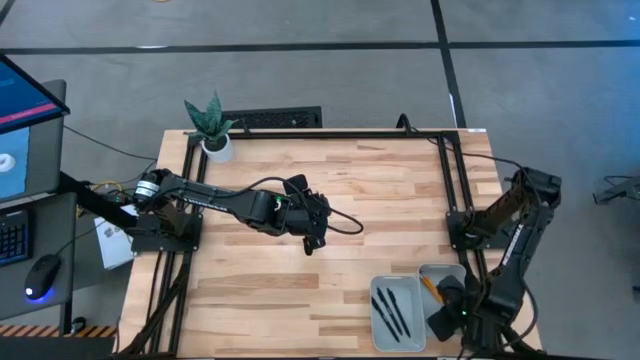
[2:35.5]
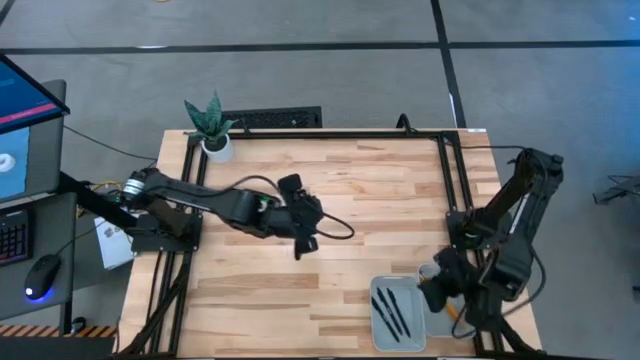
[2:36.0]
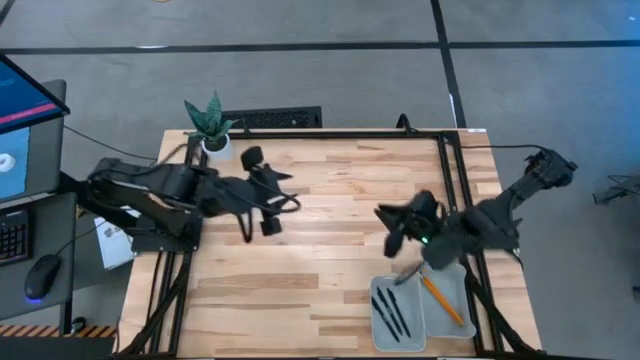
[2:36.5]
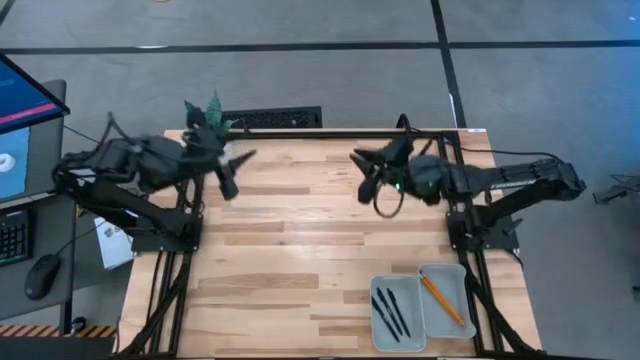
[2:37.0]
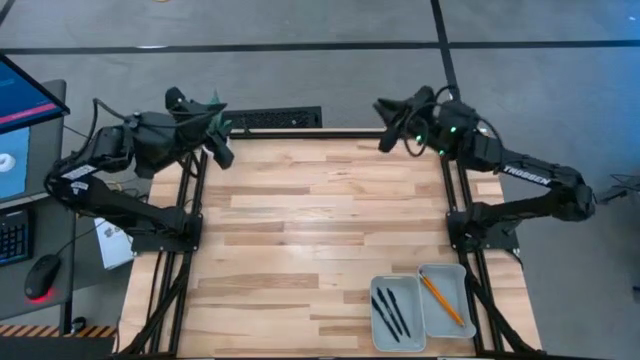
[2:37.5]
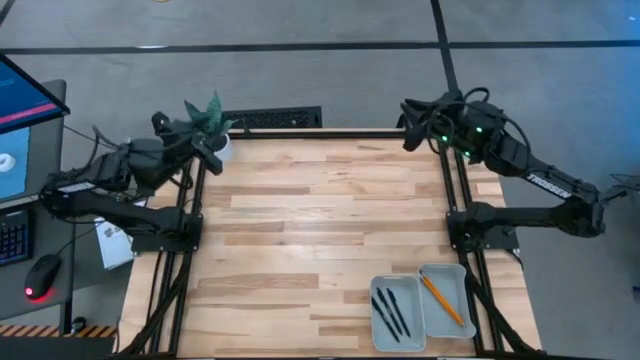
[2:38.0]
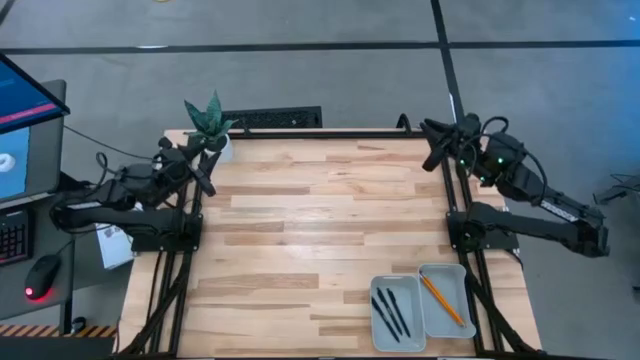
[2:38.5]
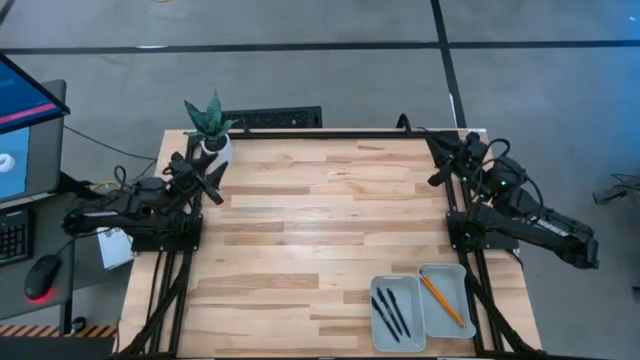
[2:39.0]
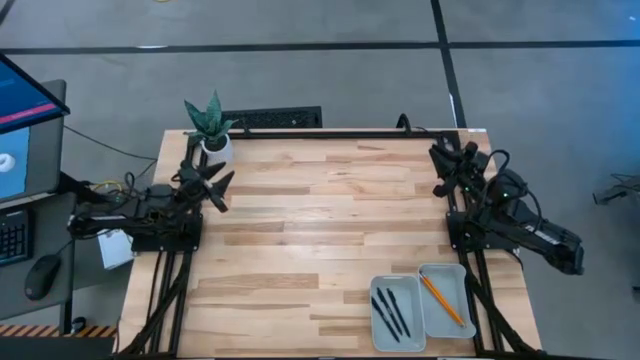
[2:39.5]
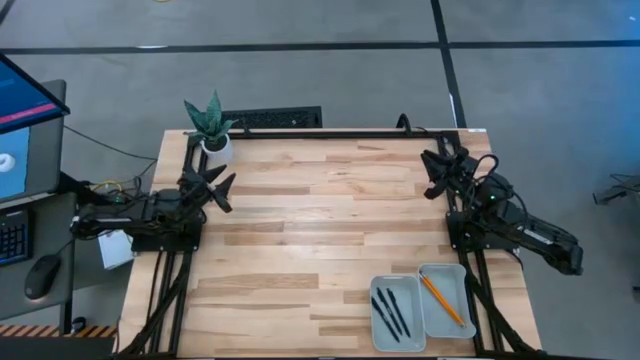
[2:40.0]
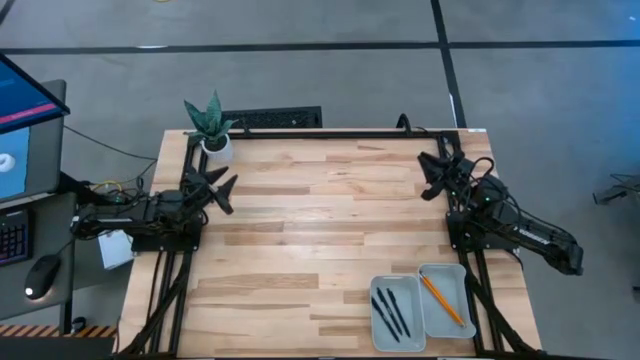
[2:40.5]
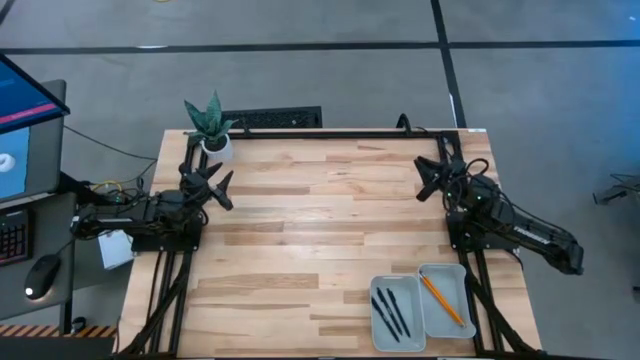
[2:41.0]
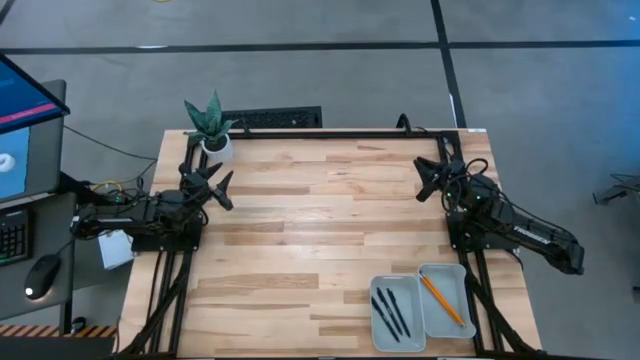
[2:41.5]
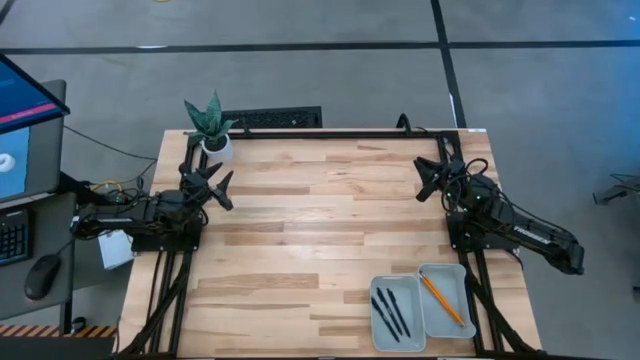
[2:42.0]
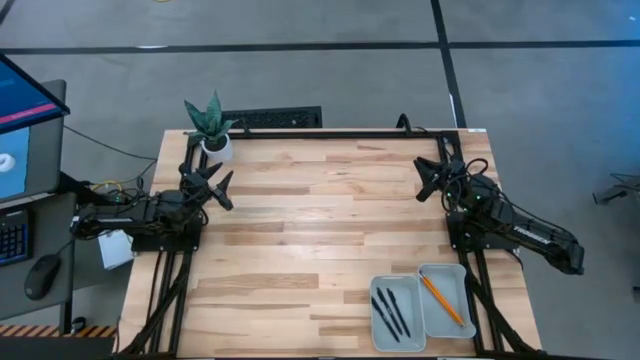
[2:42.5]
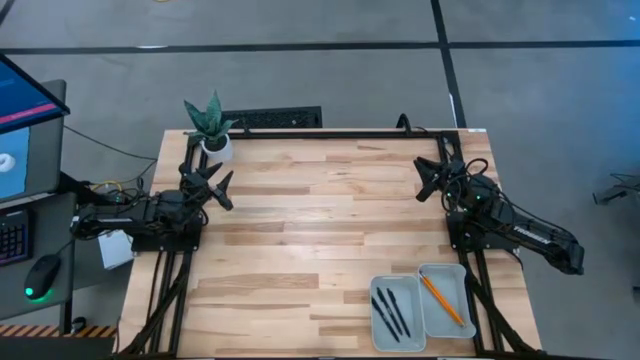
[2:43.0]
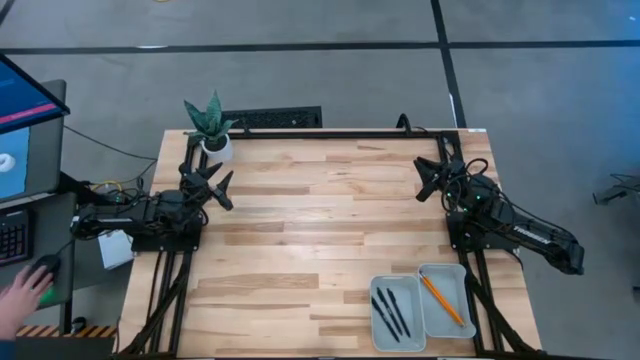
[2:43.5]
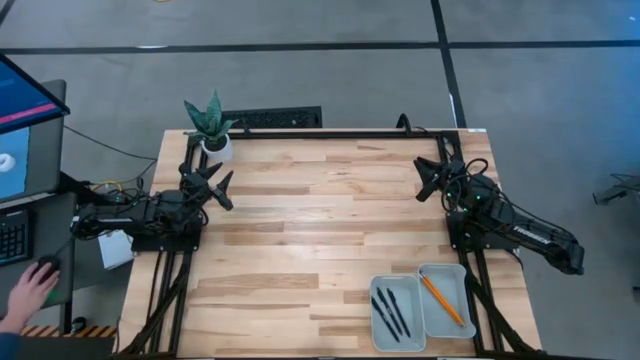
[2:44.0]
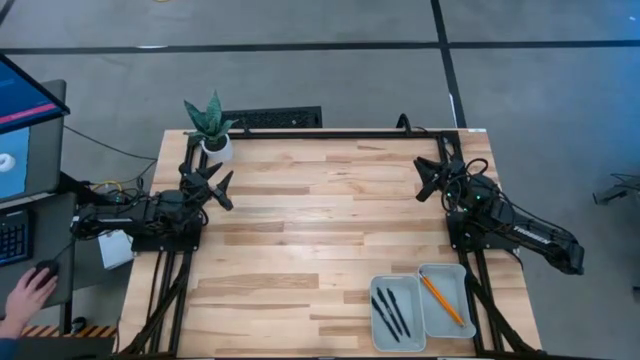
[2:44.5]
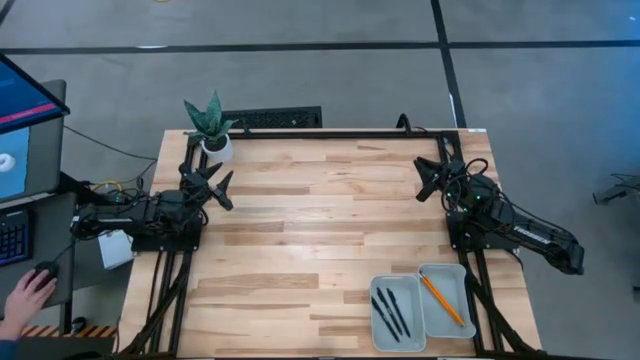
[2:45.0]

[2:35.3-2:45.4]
Task: Sort pens & pencils
Return to Home Position

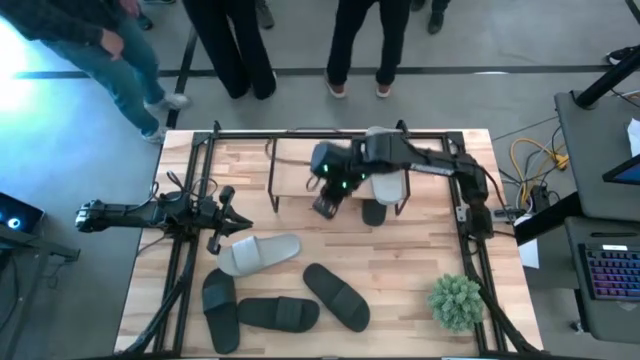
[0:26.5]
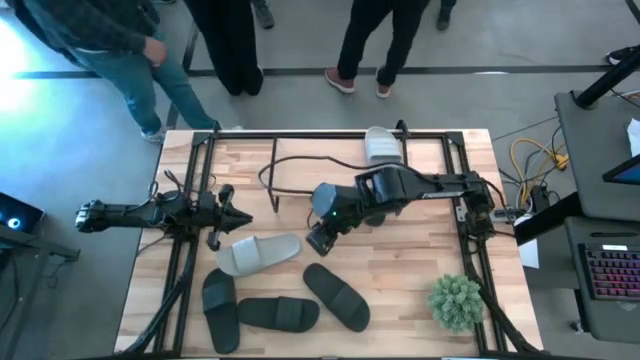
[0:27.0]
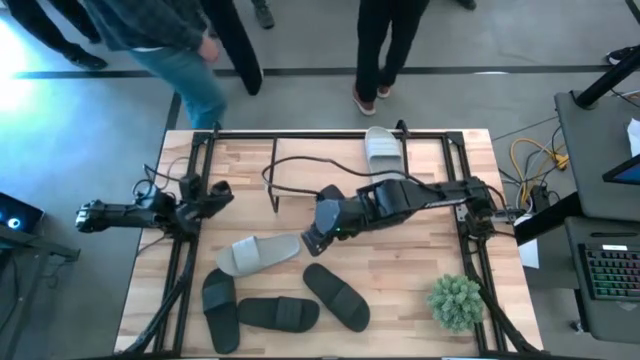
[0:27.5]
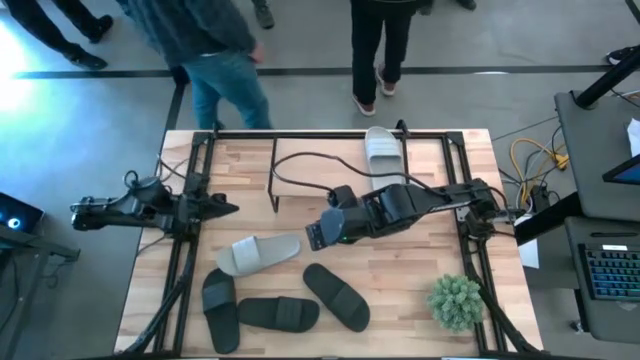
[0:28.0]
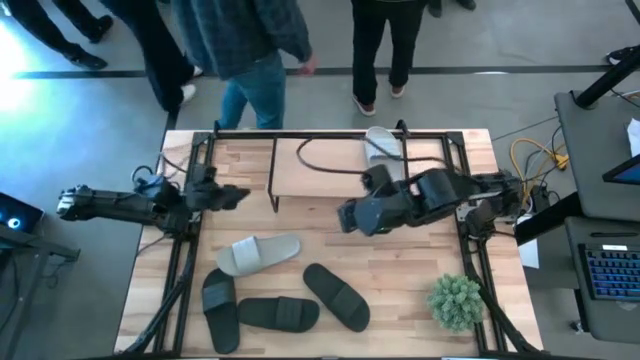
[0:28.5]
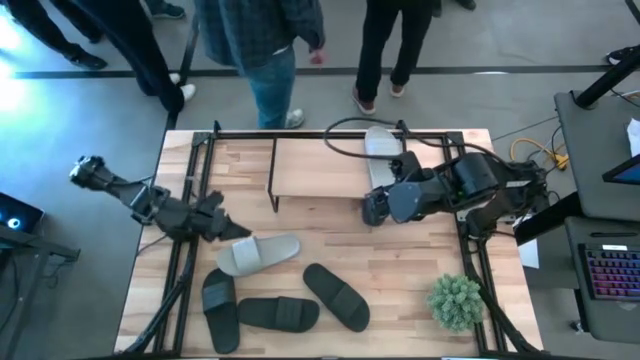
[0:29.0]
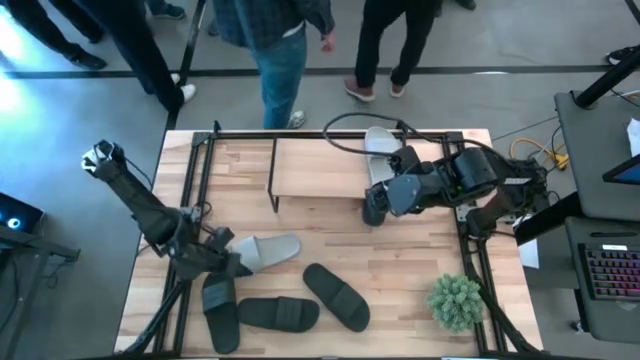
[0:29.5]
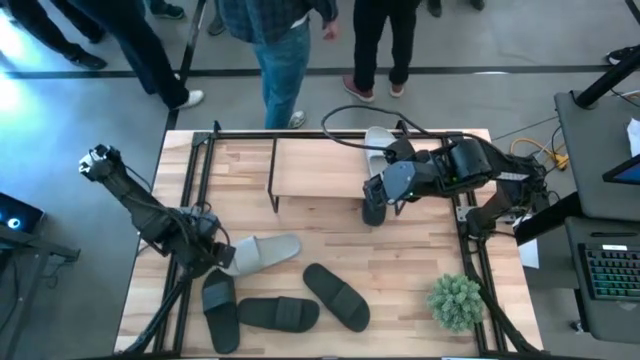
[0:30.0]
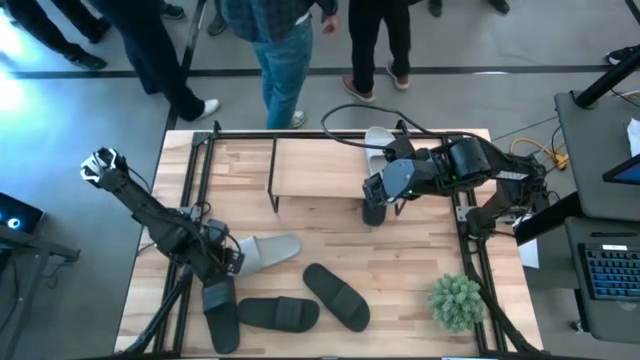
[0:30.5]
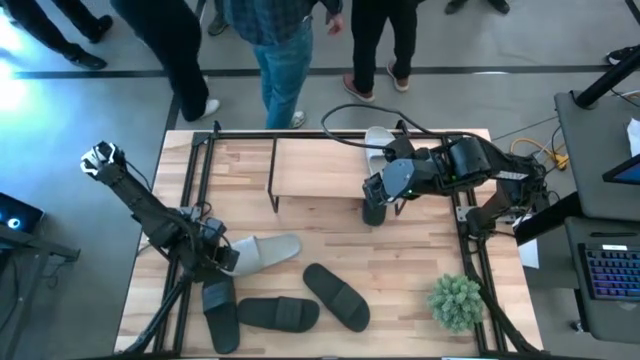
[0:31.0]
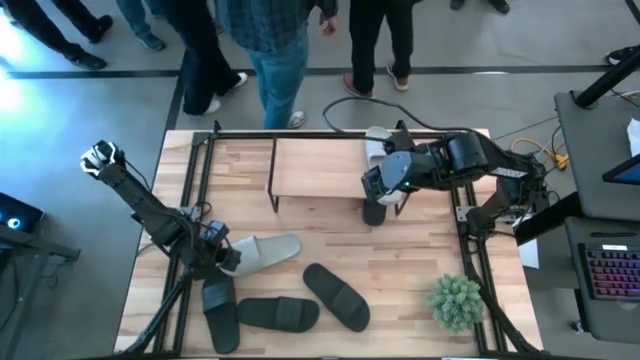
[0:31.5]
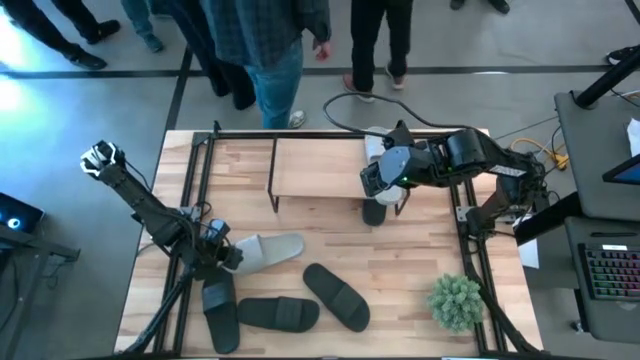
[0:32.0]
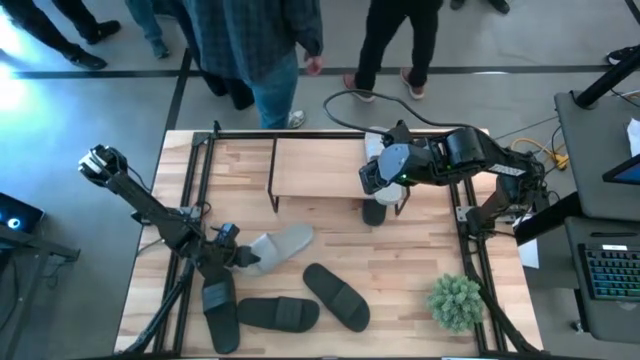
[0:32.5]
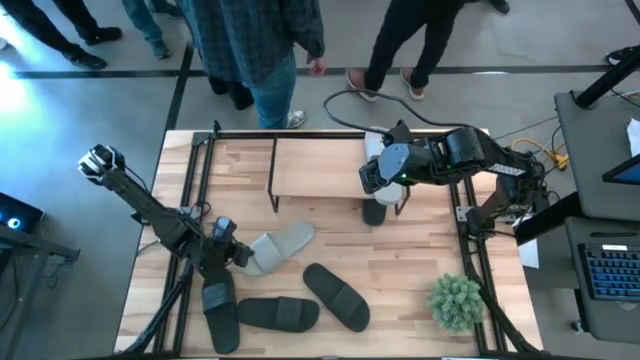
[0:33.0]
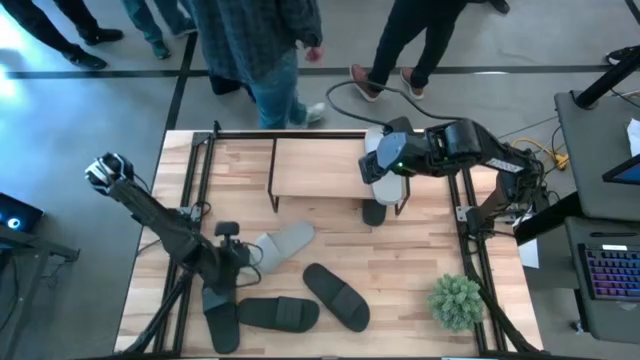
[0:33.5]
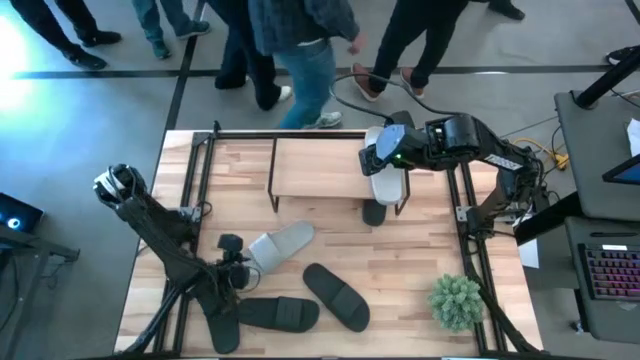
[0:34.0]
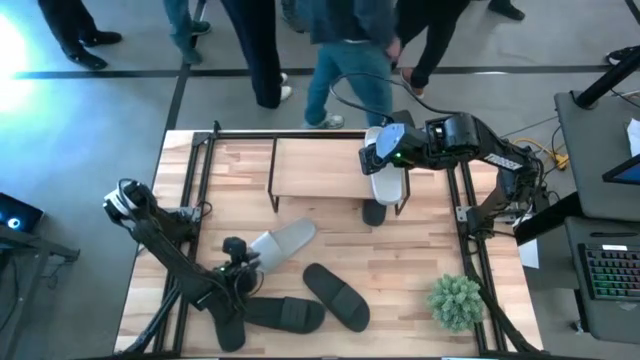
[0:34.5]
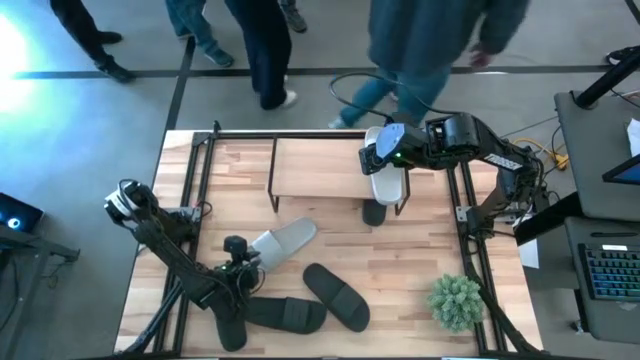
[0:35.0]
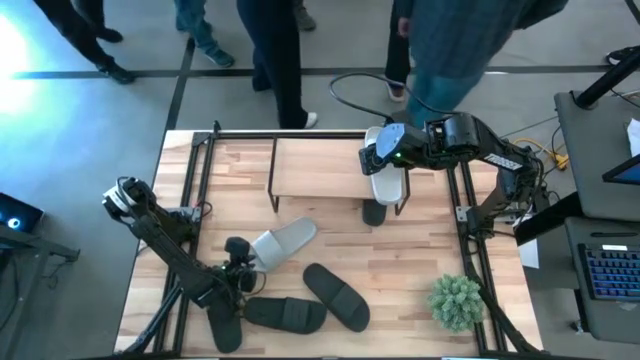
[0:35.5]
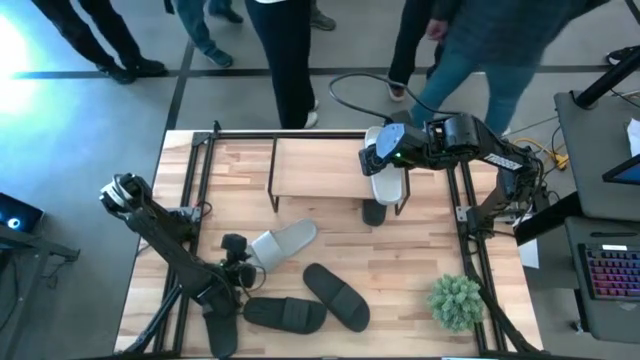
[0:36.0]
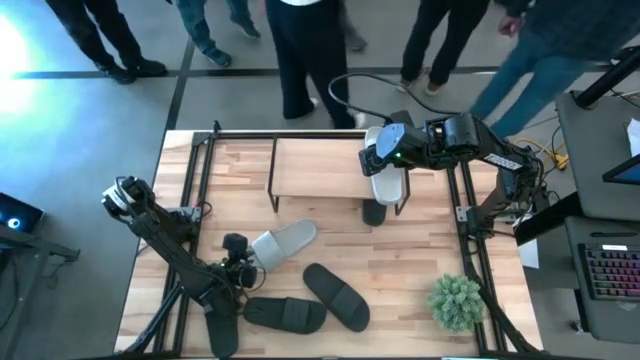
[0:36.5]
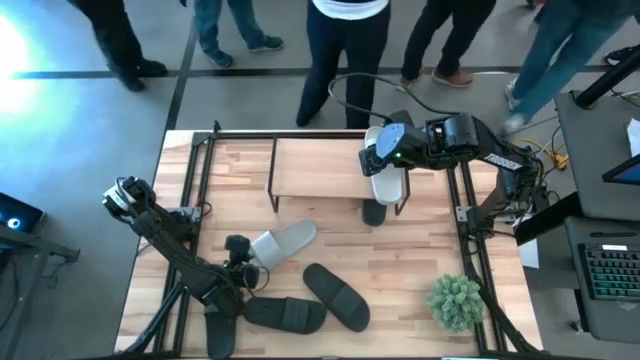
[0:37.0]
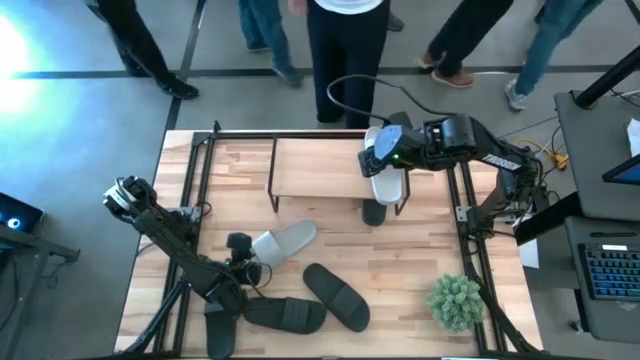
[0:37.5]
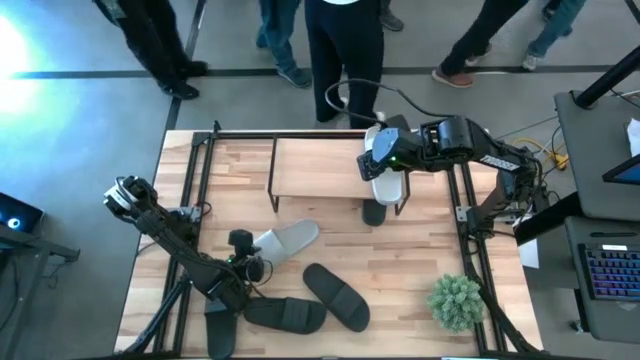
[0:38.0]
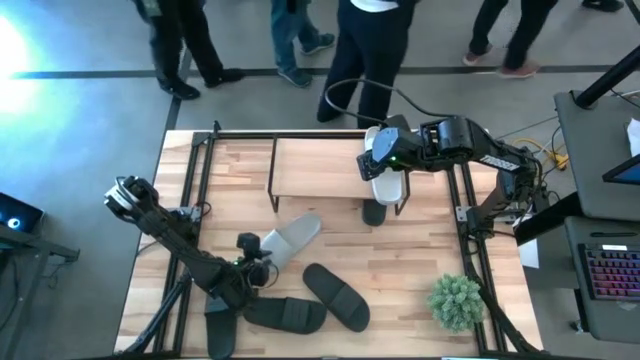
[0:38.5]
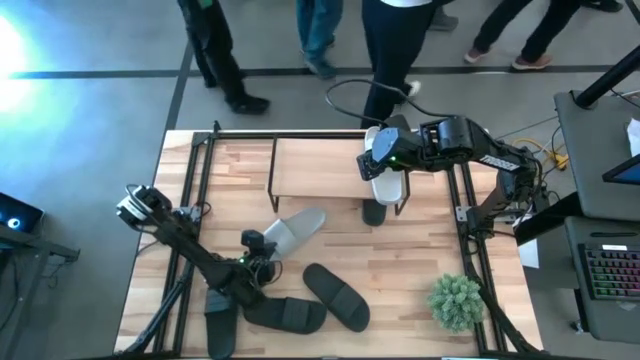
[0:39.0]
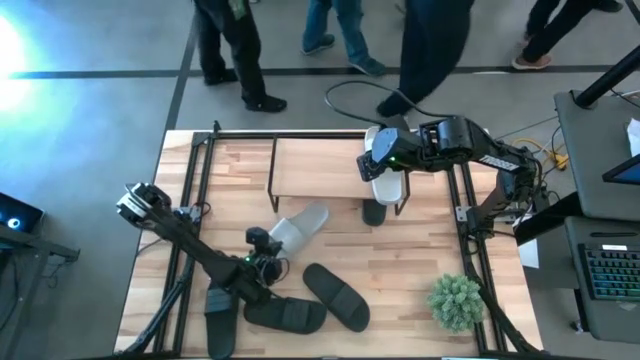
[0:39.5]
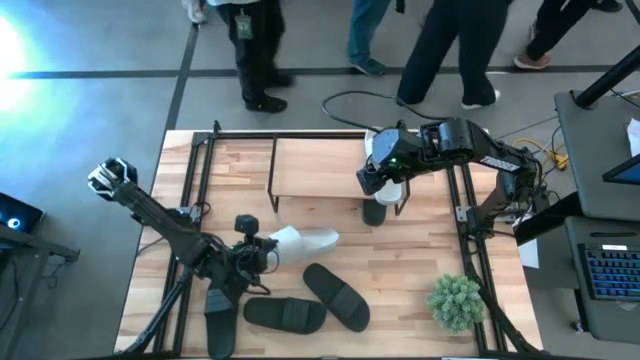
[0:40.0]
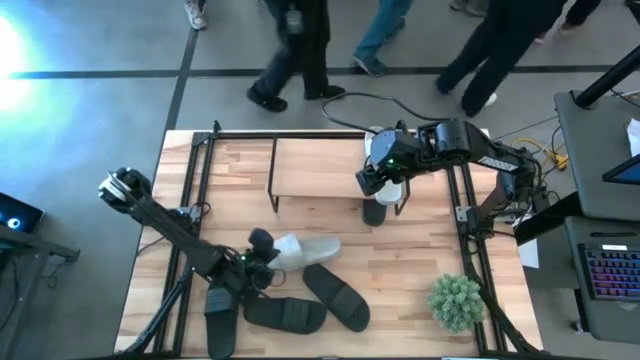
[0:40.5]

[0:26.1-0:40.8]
Task: Pick and place slides into the shelf
Put the gray slipper on the shelf
